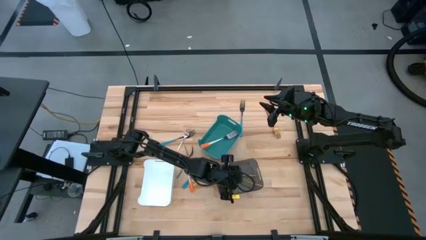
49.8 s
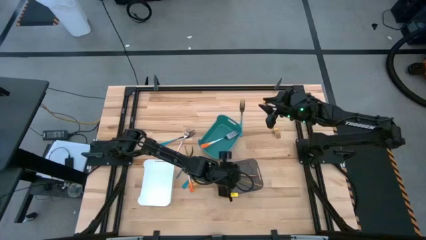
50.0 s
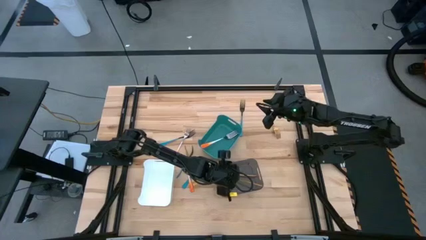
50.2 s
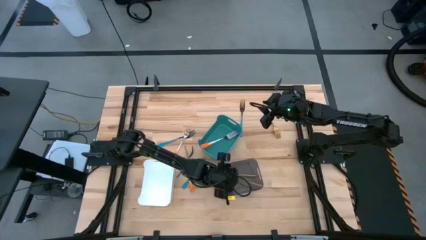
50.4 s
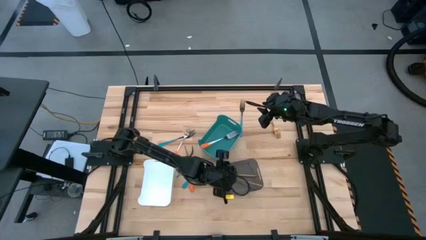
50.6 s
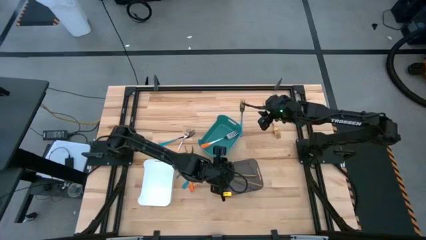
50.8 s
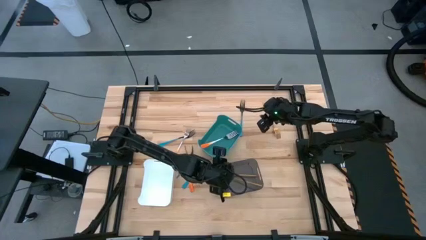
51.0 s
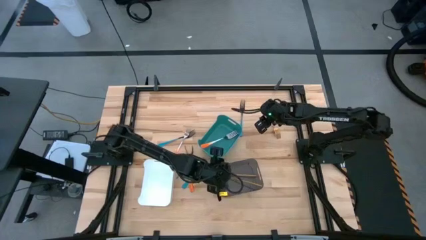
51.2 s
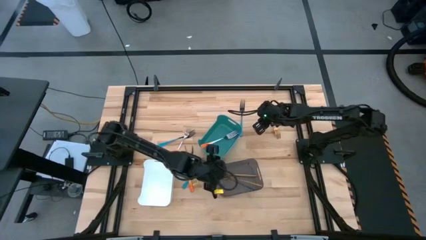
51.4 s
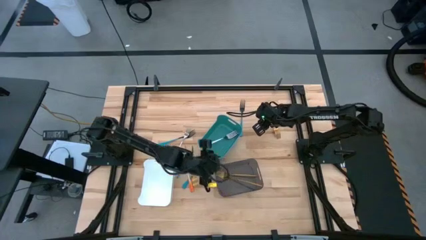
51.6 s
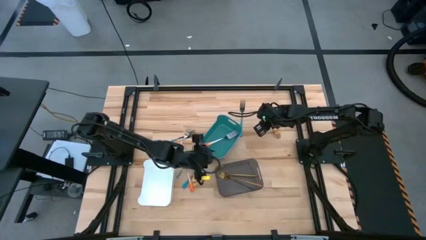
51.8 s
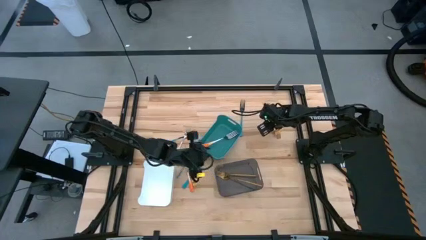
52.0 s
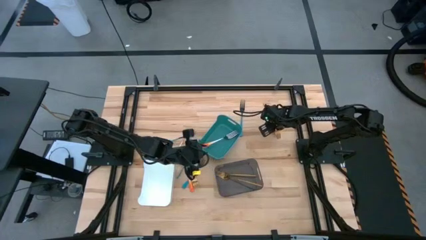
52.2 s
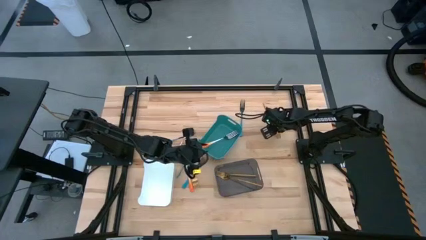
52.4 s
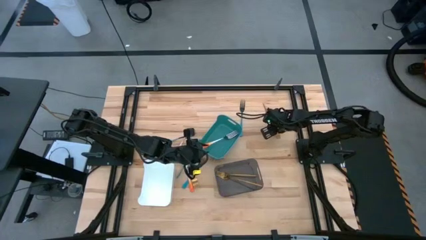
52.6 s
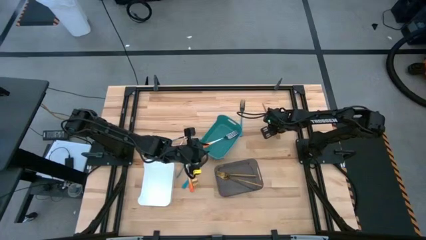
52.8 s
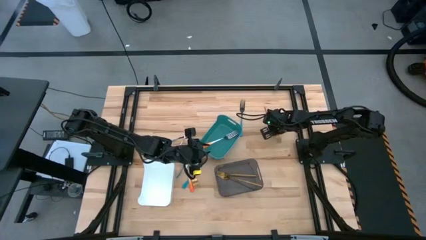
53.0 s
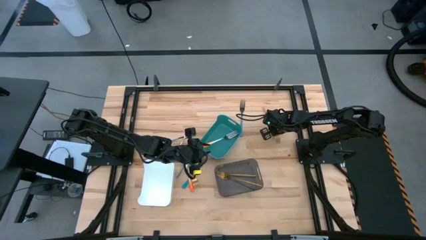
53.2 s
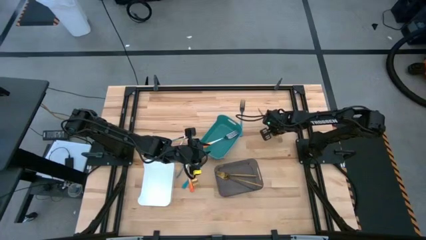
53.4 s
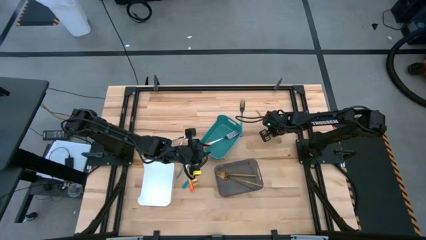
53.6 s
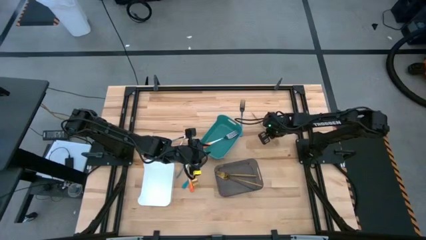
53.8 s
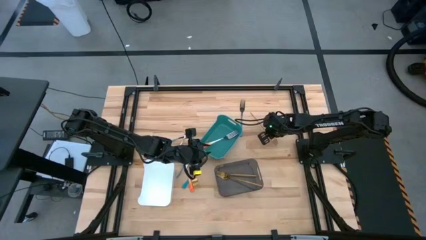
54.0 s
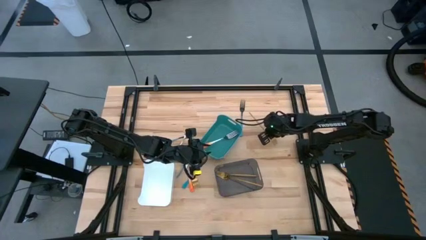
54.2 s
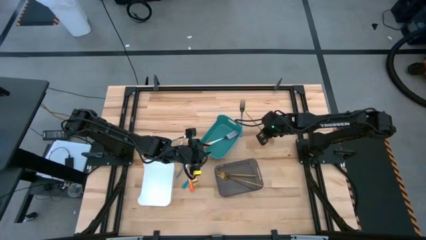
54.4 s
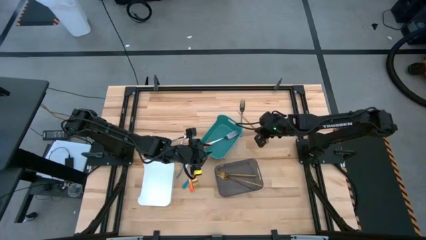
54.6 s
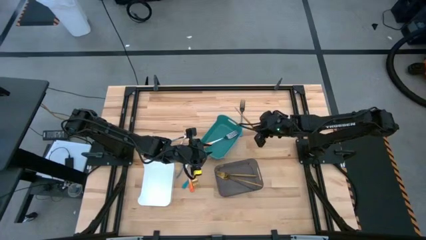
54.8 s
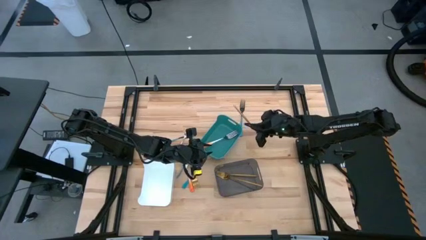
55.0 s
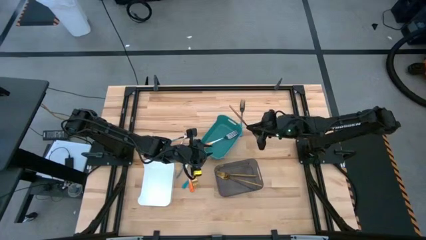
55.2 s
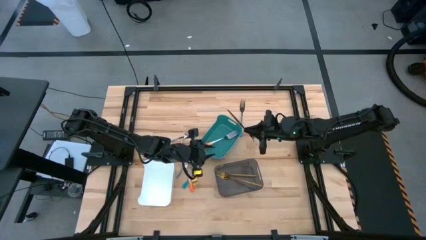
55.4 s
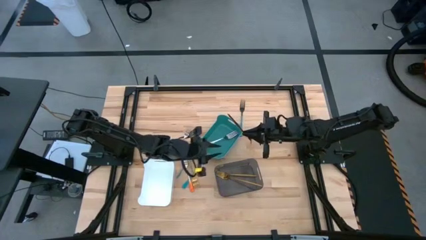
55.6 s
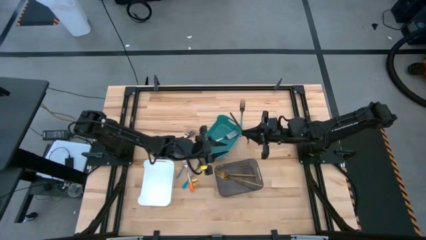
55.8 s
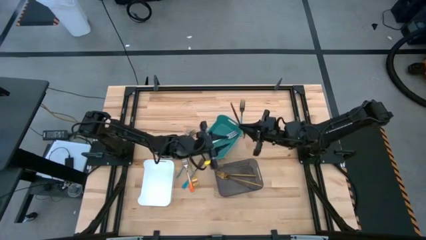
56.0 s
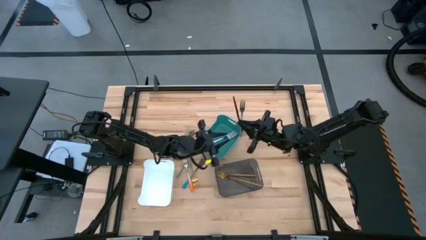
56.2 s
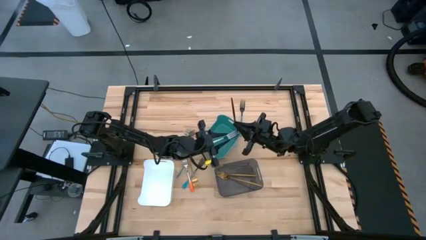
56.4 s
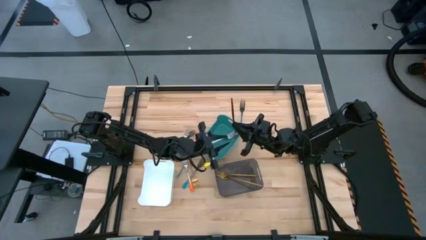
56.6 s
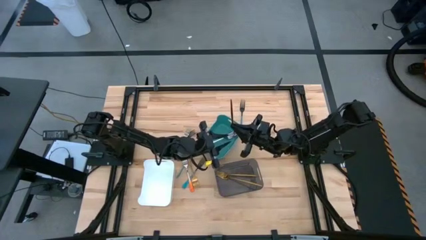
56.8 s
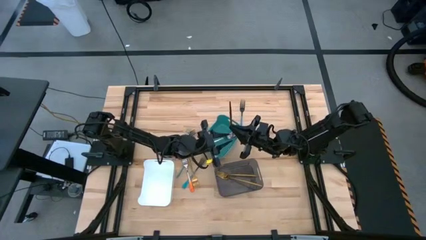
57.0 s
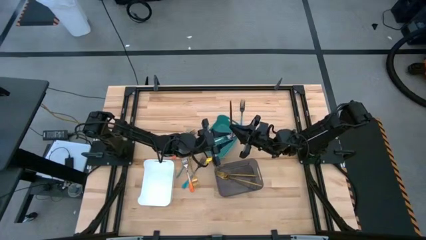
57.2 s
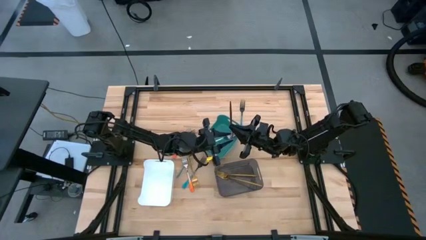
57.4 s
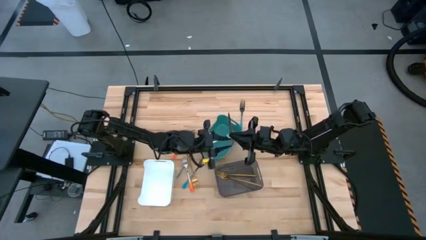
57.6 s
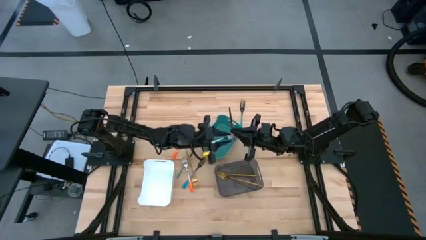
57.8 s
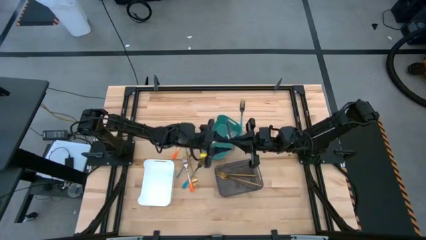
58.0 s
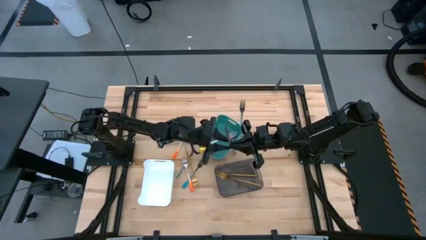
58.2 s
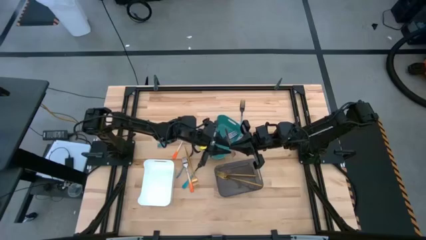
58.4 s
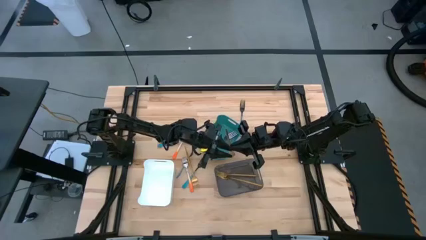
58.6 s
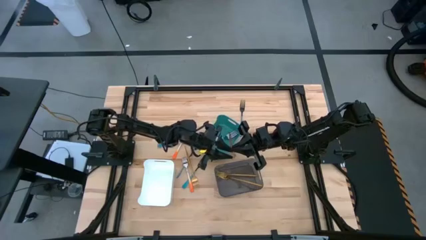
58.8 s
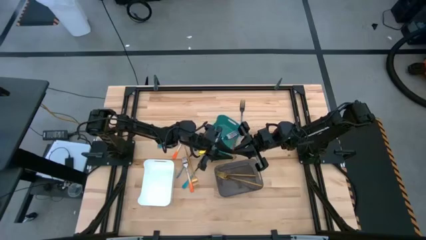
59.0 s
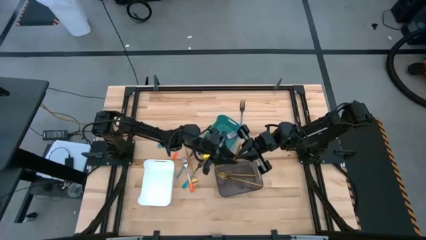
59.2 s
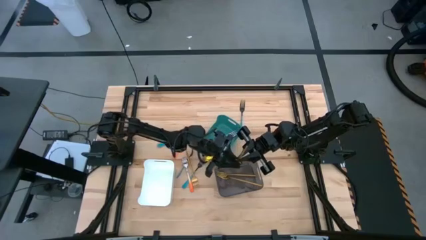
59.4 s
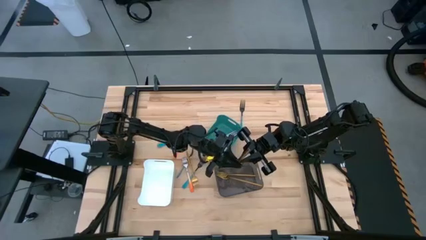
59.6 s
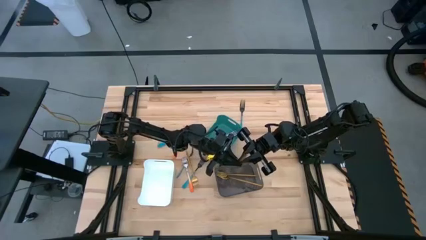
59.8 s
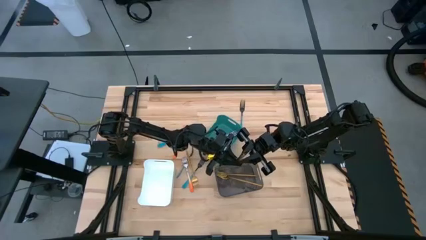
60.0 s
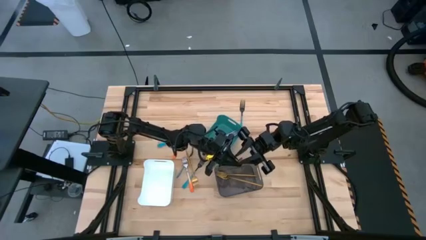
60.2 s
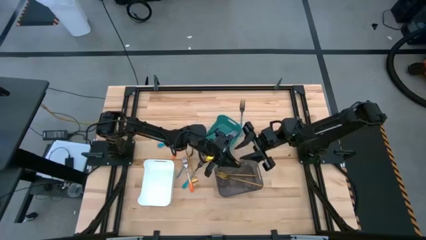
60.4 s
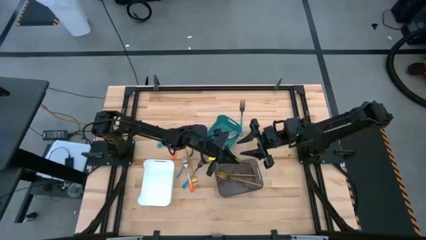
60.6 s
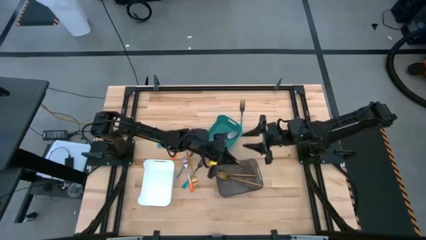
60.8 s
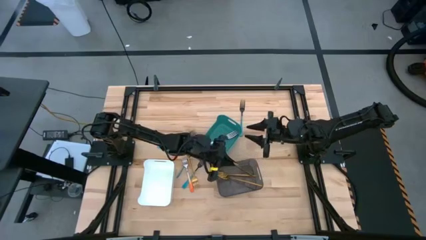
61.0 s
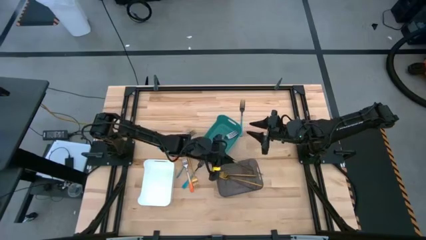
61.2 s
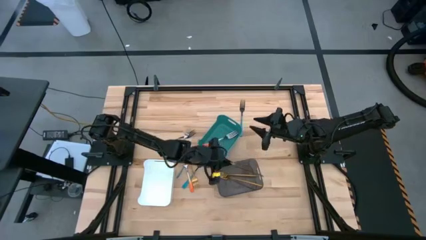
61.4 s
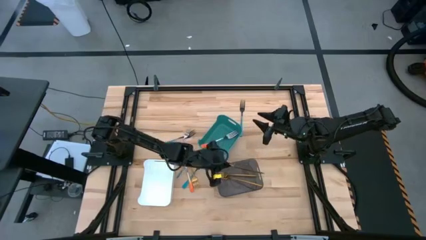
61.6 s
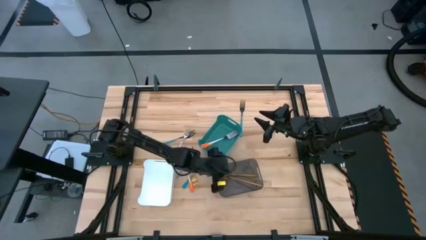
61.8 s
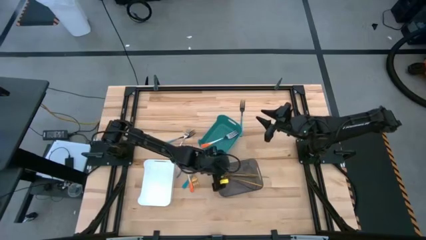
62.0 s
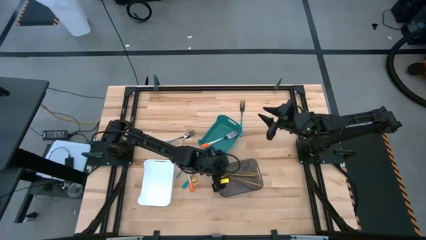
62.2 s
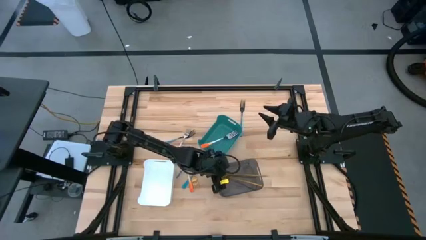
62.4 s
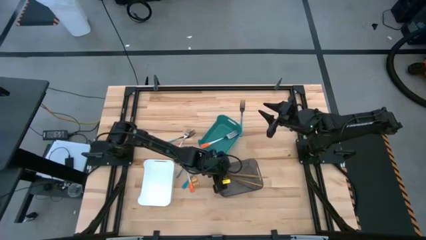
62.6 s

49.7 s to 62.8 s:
Task: Sort silverware by color (type)
Put the gold fork into the black transparent bin

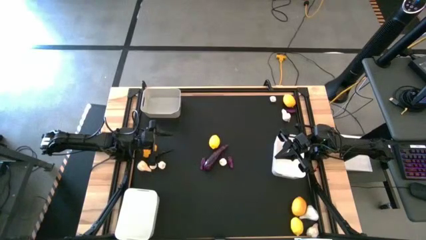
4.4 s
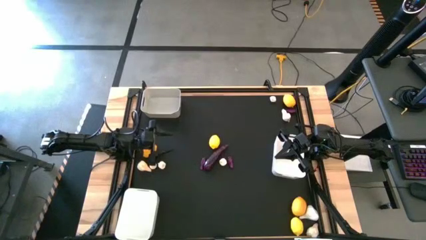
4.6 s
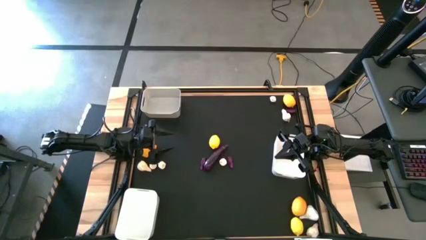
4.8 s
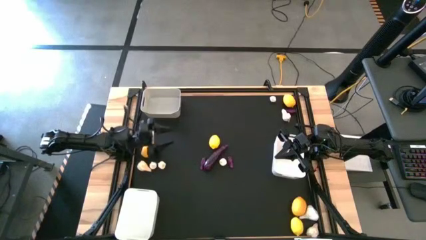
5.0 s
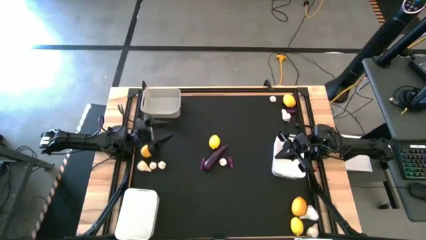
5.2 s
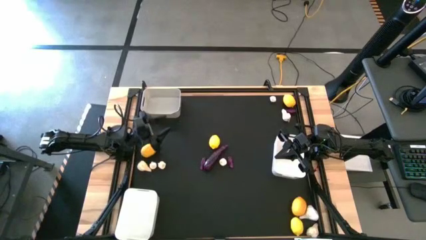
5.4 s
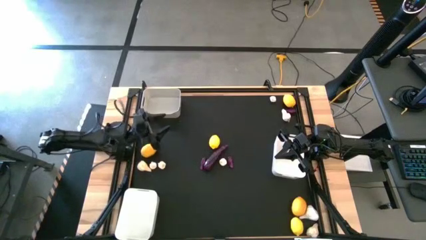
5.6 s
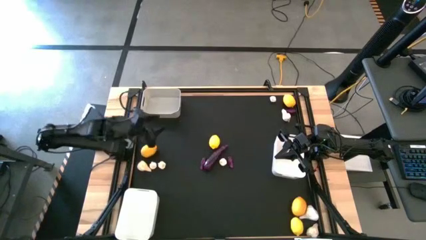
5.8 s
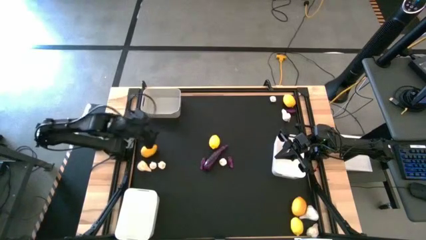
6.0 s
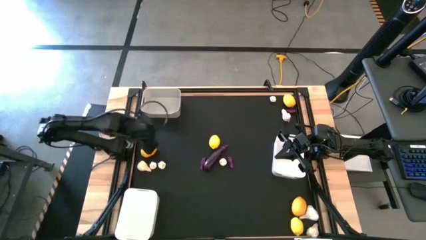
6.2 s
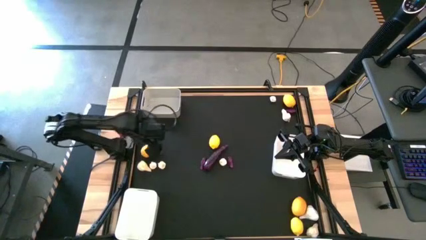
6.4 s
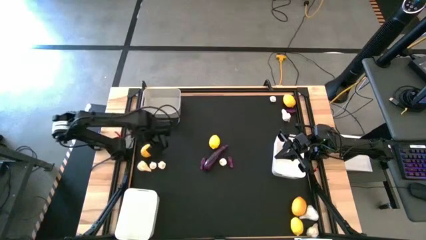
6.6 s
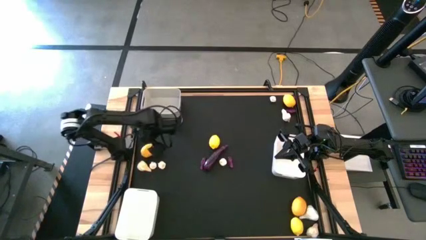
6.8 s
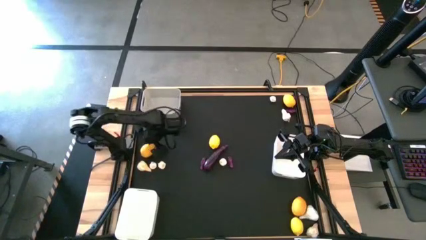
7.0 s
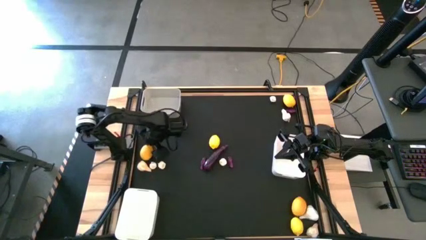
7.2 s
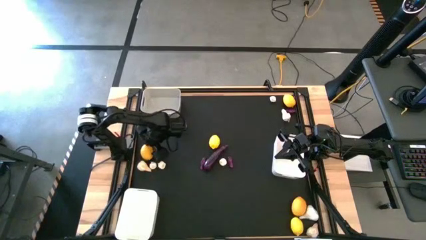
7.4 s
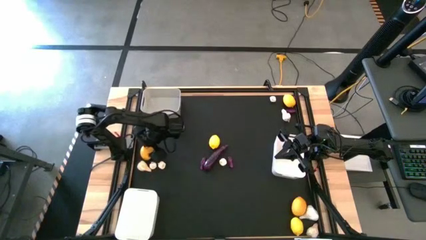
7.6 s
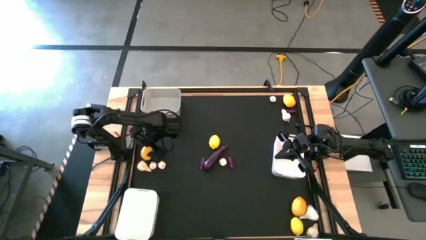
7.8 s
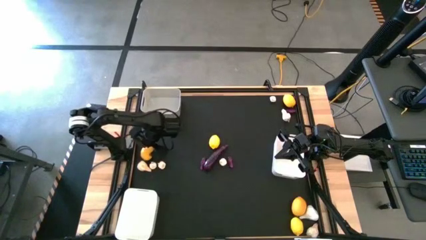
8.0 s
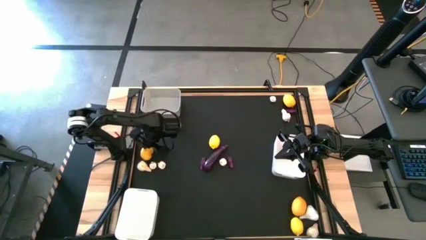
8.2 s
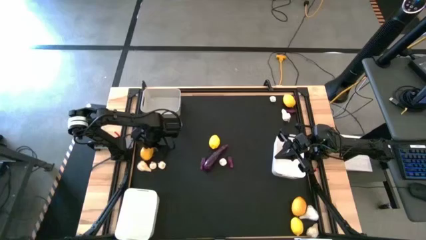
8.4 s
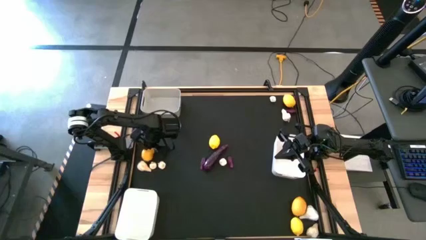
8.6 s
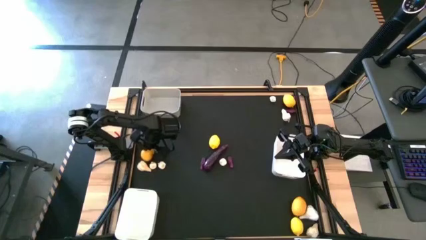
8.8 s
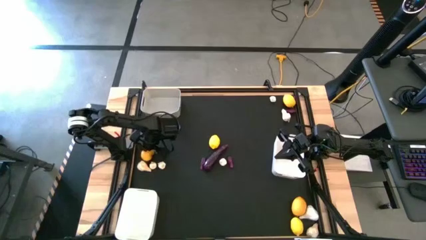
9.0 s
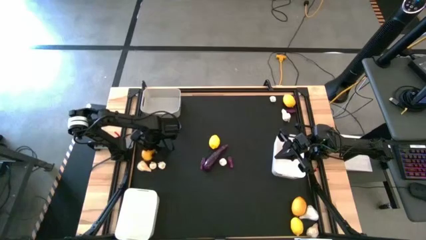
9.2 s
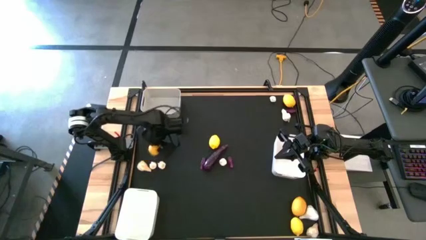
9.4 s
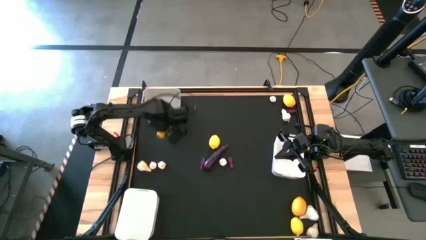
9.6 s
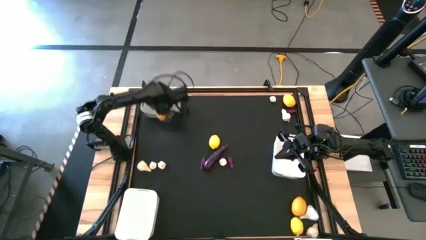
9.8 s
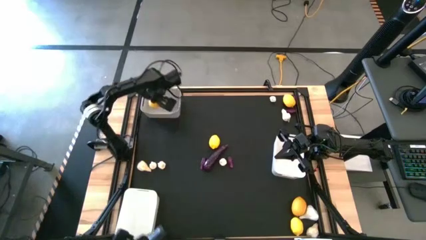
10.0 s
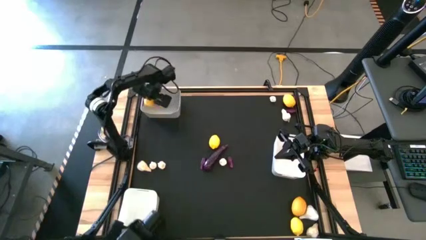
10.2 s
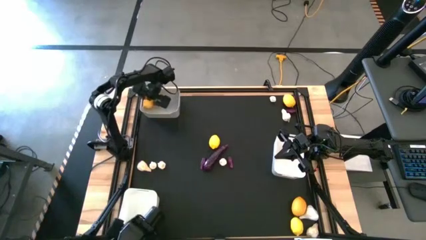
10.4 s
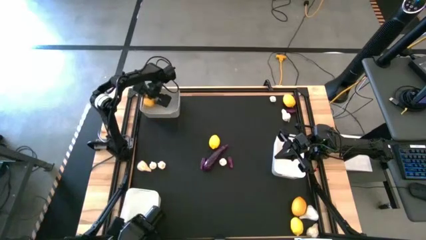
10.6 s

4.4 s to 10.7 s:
Task: Sort produce into baskets
Put the top left lemon into the top white bin
